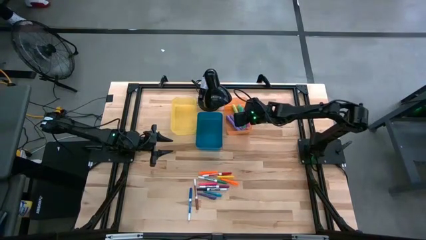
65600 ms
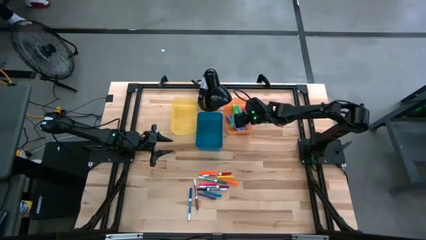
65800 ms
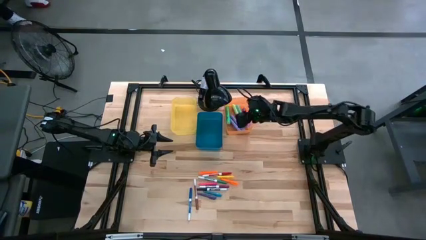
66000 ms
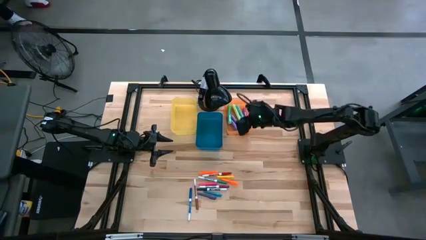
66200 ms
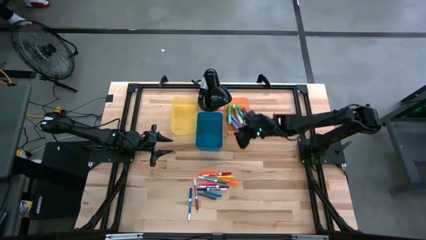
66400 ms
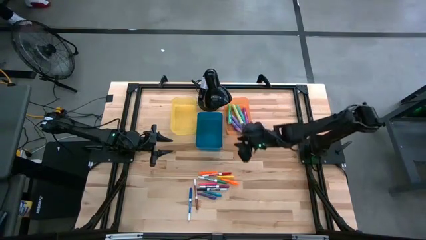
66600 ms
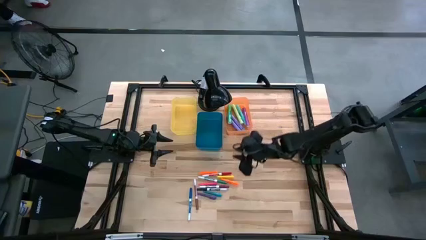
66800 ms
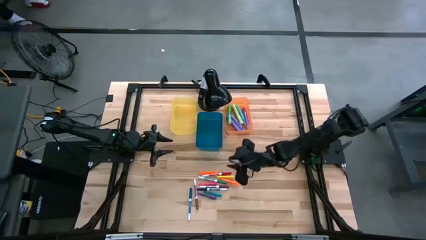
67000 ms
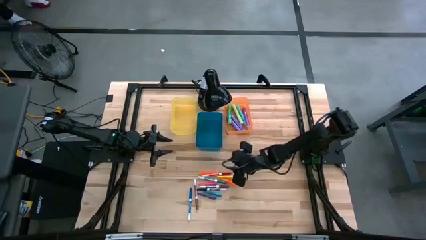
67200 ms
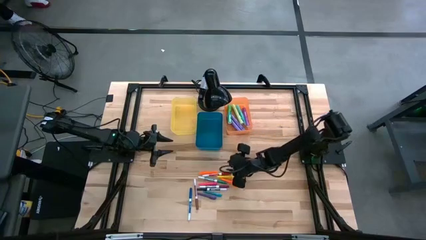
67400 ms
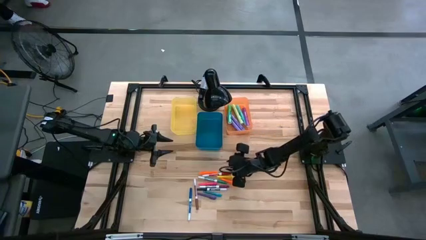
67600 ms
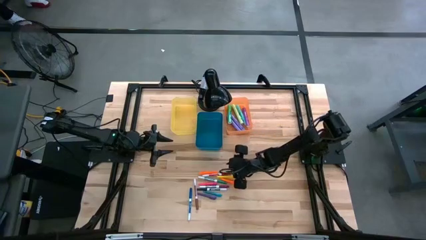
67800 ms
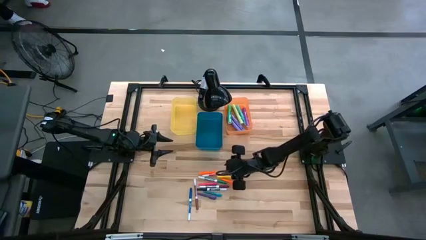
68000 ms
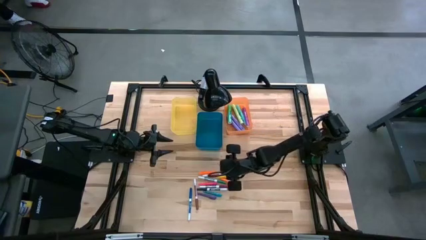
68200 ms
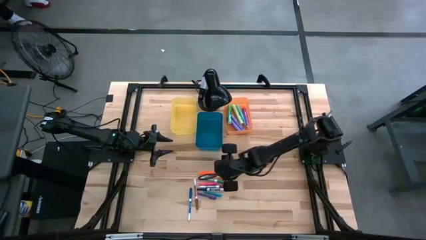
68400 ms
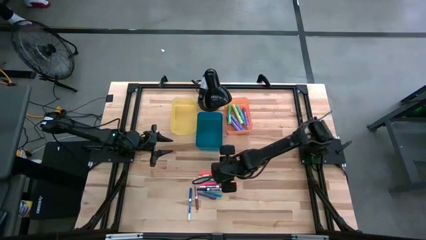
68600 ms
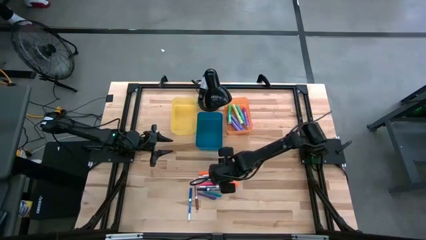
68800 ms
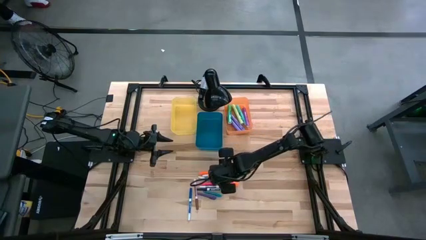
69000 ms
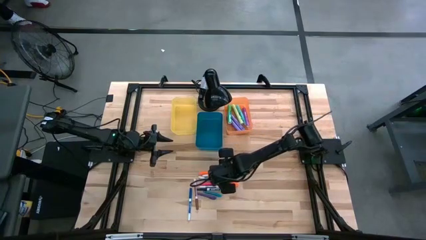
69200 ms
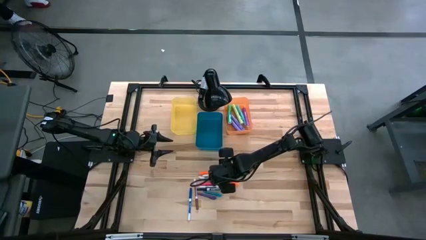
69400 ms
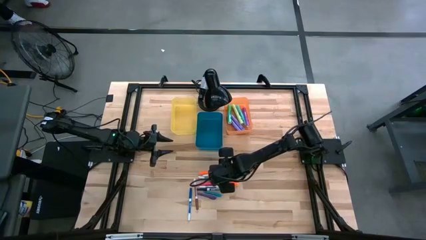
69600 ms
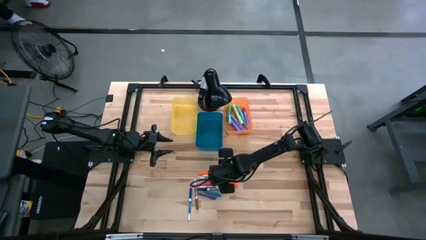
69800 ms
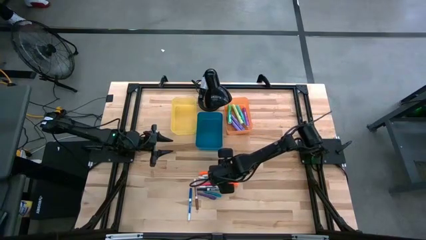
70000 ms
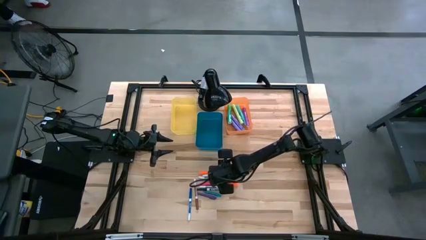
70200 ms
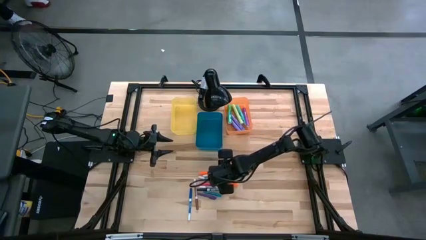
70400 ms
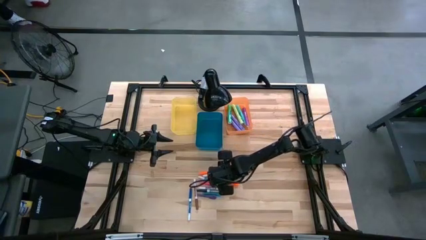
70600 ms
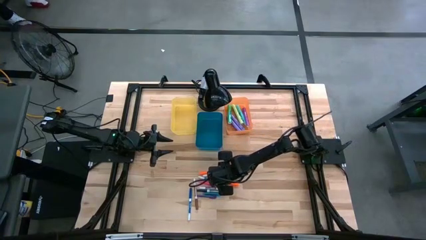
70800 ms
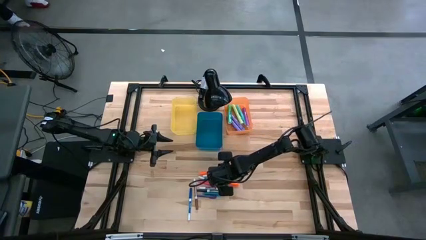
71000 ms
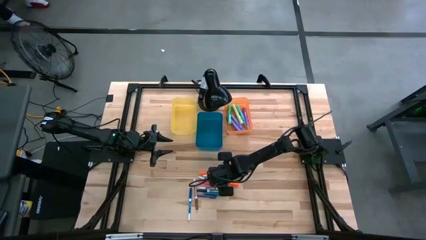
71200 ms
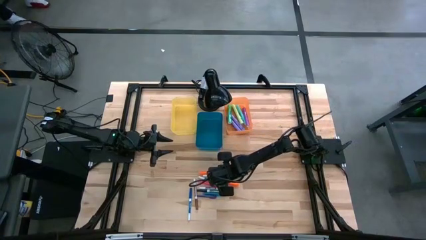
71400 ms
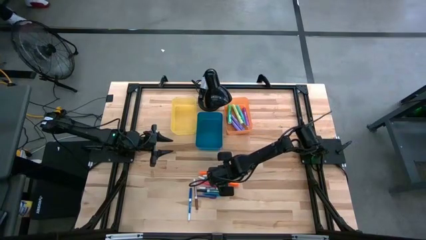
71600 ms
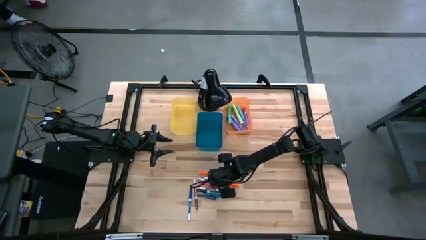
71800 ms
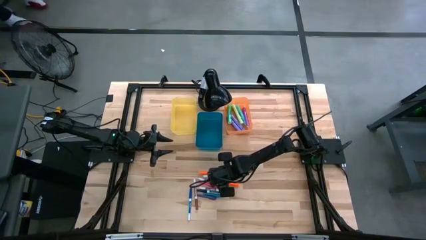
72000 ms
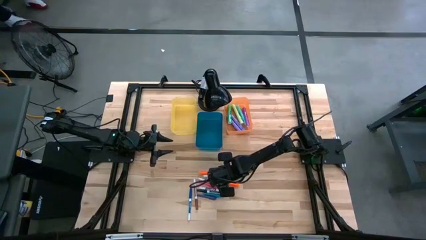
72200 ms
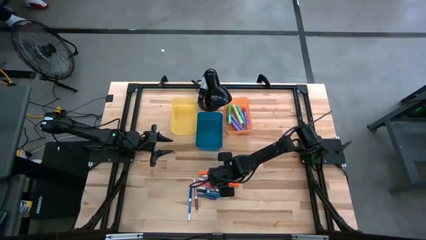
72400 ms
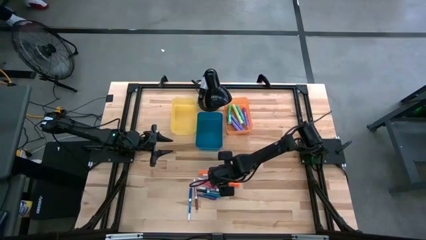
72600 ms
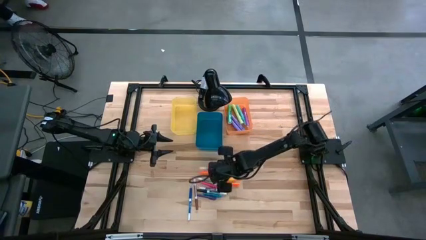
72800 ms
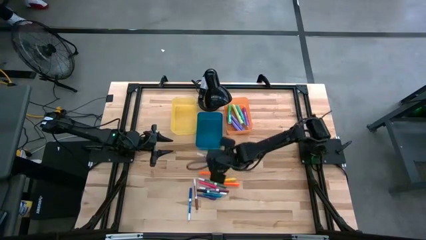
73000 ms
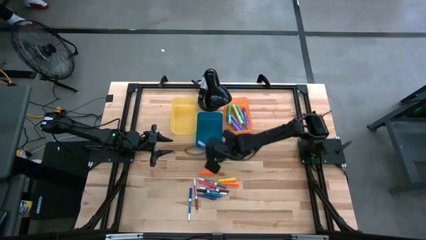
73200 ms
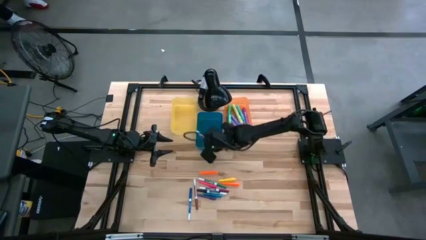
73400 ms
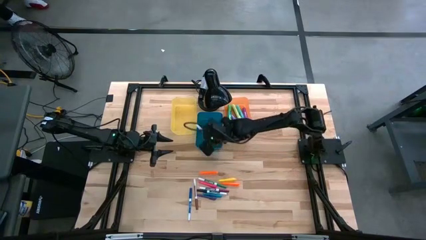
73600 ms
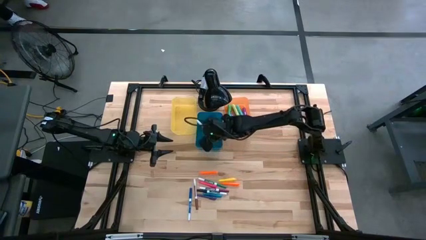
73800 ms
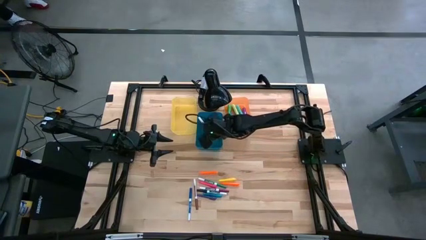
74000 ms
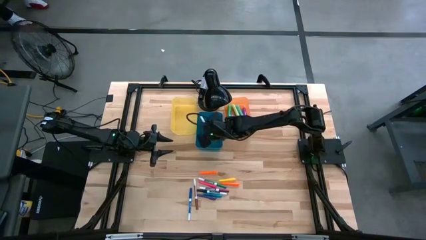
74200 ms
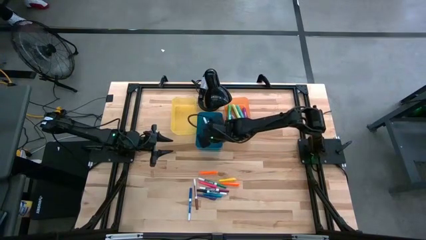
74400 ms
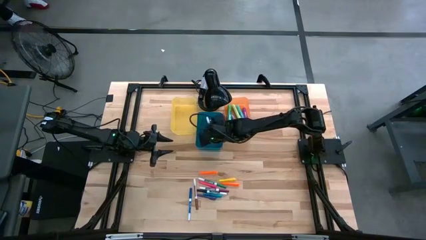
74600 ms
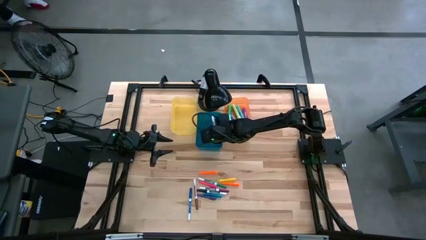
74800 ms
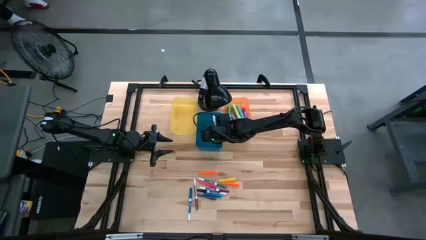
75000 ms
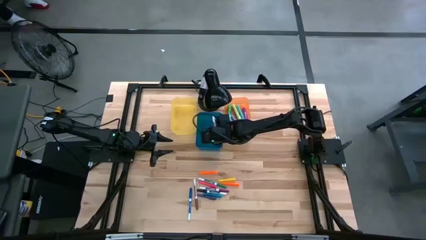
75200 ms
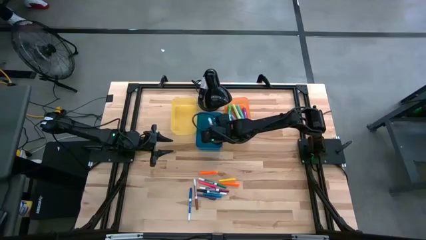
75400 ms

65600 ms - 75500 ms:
Task: Pick & Place Markers
Put the red dry erase marker into the blue bin

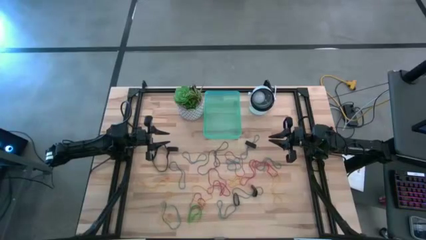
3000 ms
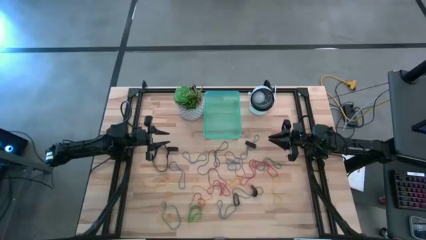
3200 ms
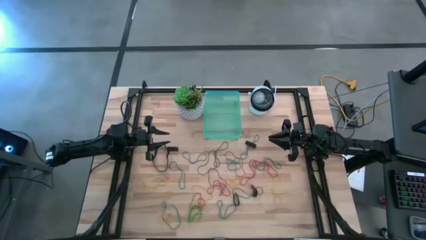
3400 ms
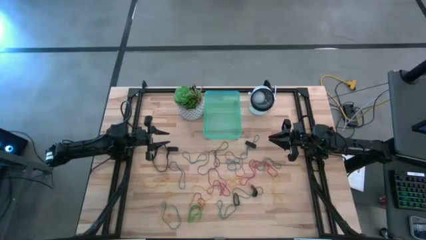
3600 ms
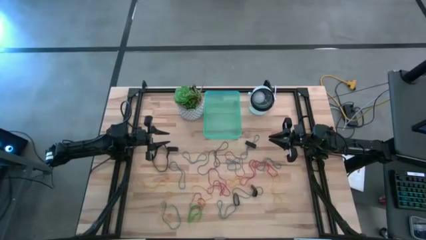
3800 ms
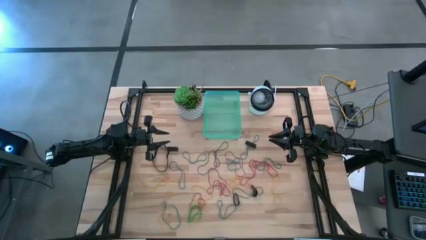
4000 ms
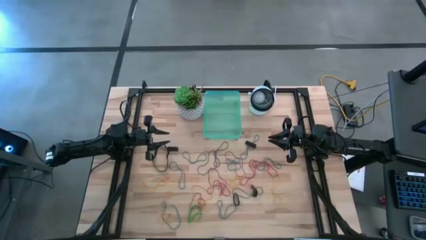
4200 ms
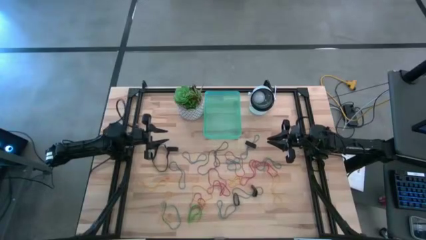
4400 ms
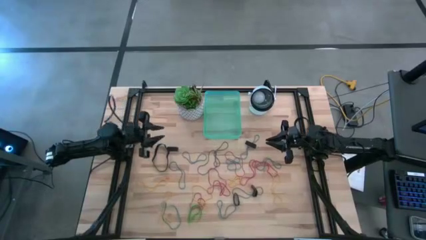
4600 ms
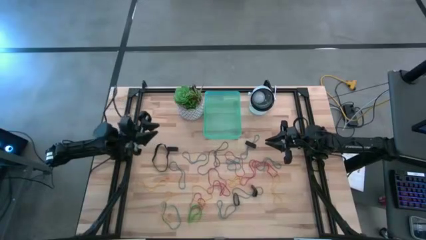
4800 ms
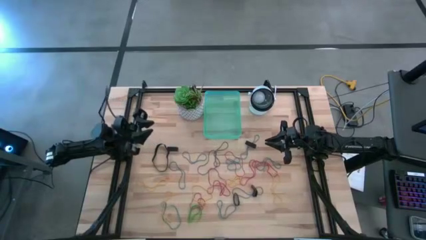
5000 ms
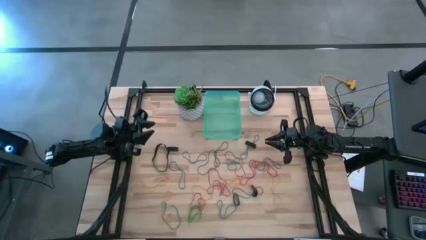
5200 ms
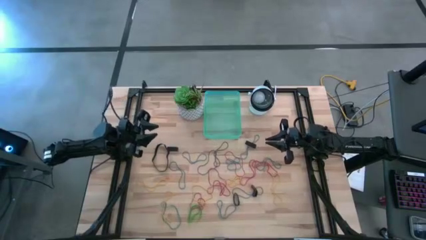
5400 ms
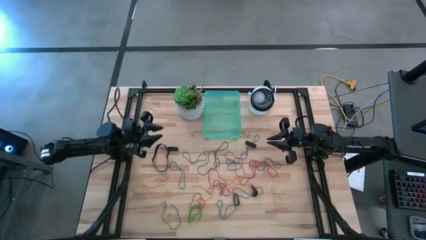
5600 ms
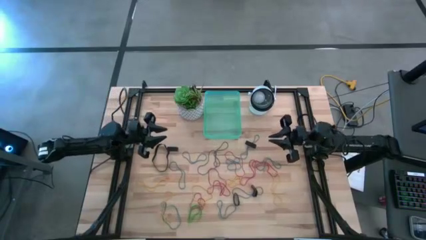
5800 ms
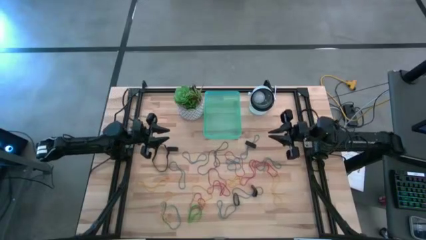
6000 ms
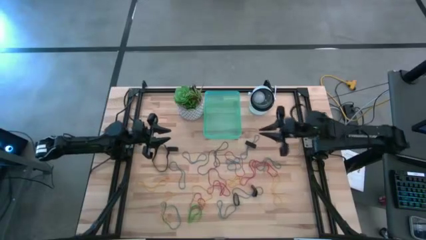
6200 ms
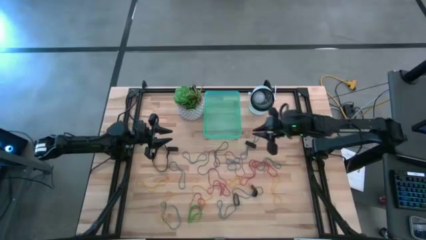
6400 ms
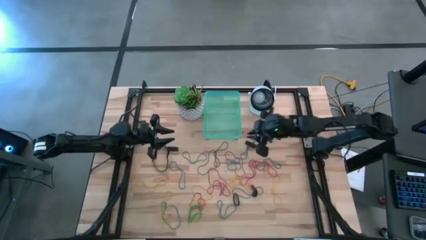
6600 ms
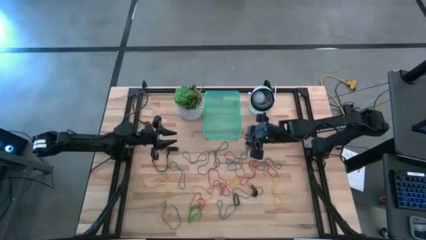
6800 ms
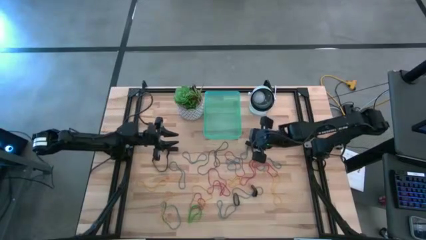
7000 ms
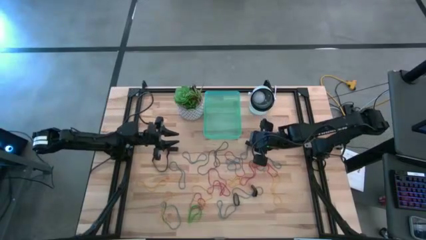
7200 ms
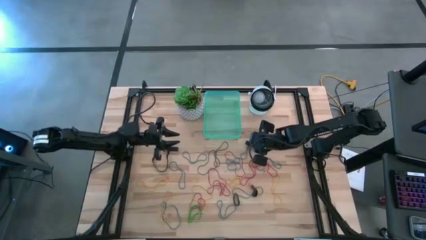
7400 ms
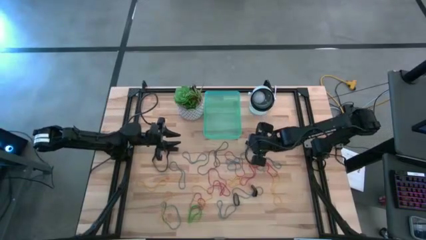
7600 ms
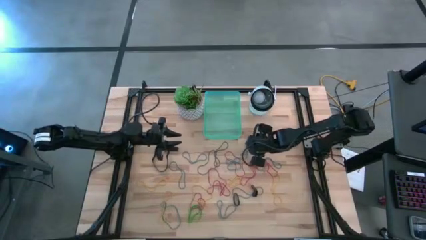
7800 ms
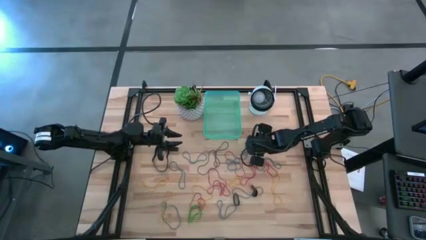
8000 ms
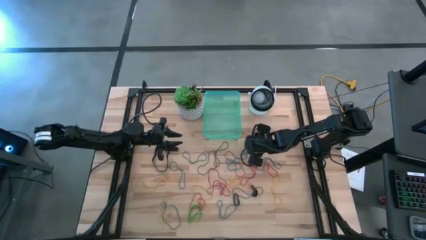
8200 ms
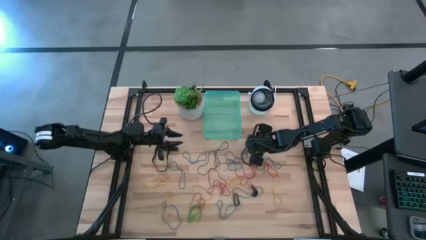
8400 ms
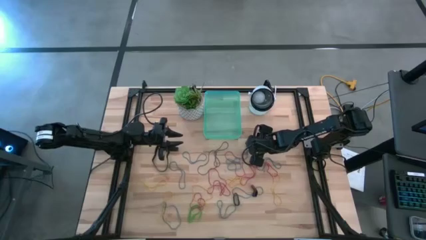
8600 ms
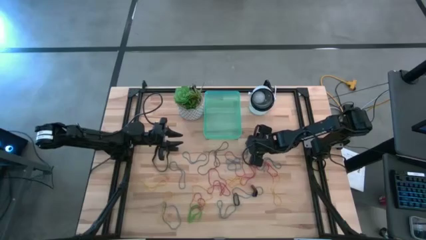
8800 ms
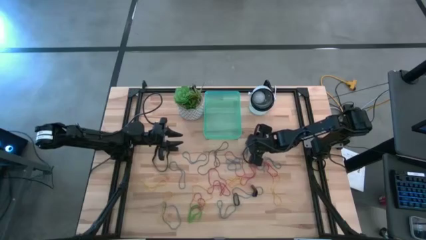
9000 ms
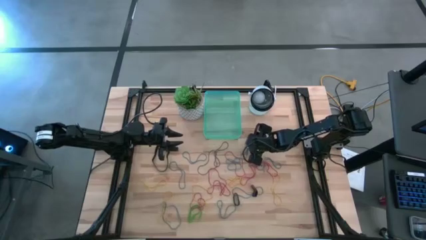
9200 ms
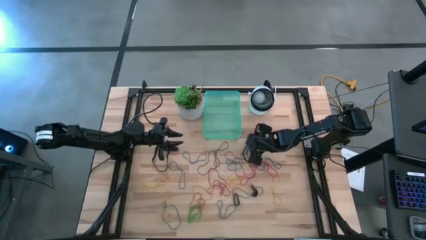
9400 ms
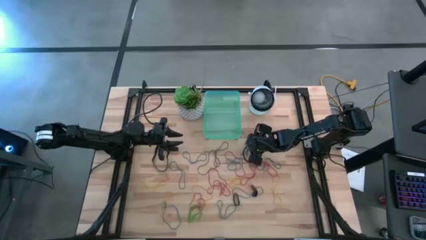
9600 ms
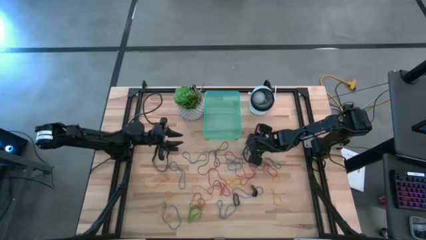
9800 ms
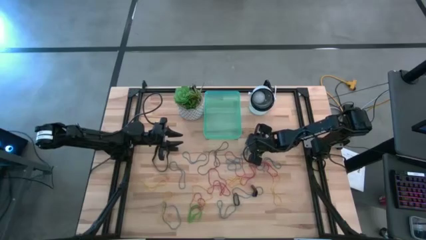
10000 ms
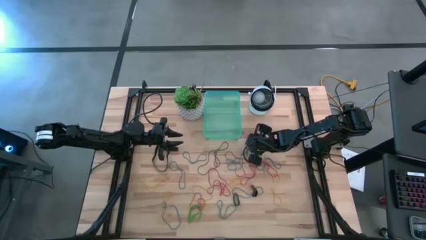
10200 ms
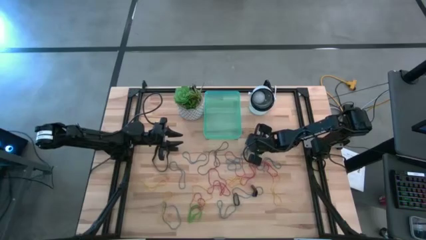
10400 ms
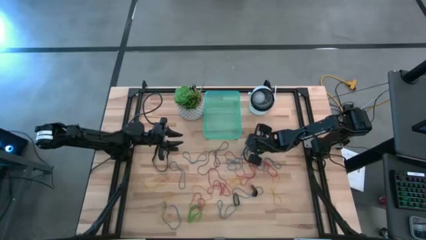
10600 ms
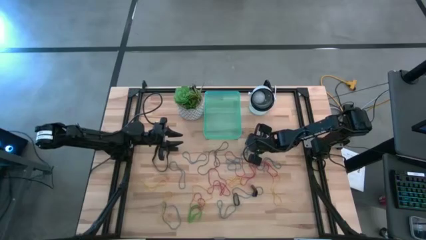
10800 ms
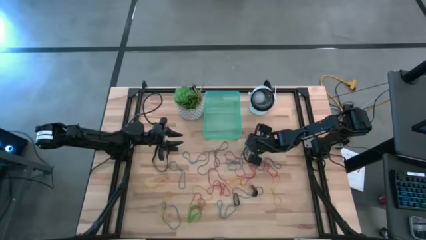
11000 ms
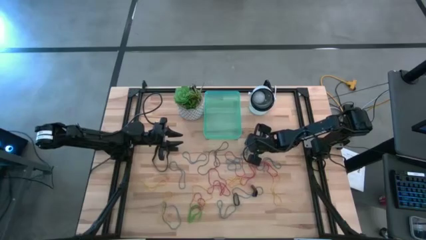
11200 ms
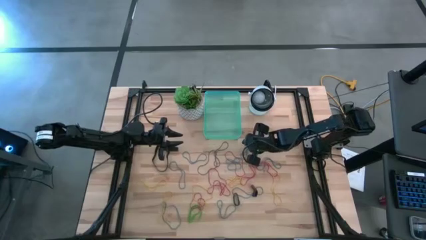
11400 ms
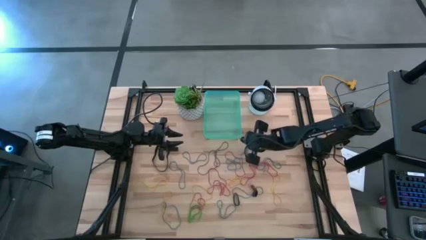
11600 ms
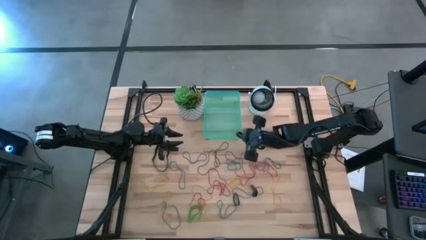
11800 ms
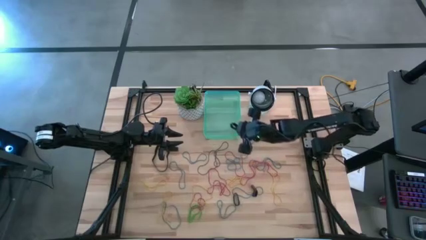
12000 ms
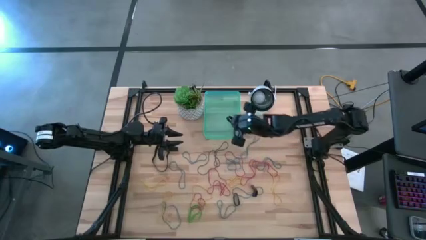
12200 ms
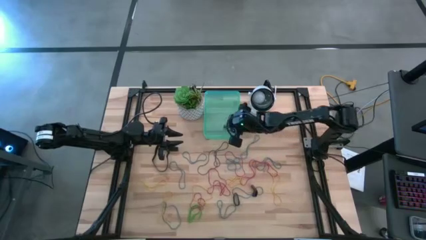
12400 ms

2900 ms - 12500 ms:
Task: Pick and place rubber bands into bin
Put the black rubber band into the green bin
